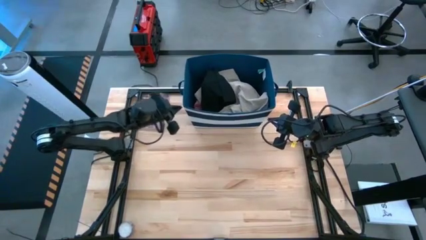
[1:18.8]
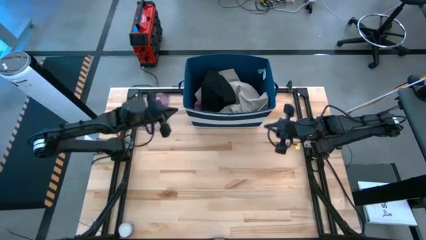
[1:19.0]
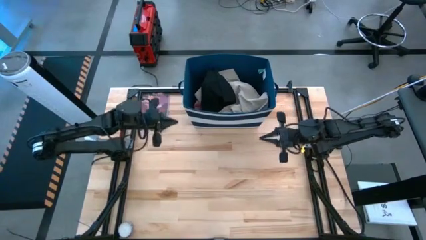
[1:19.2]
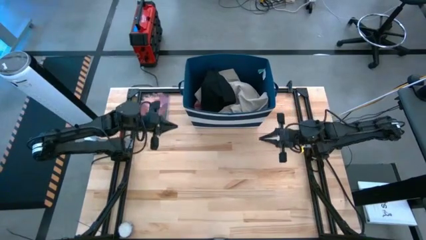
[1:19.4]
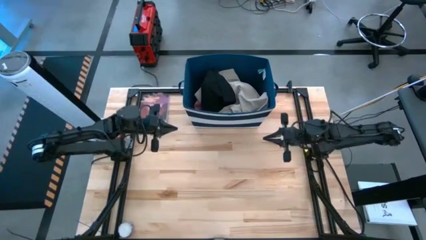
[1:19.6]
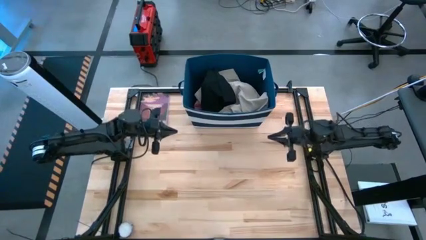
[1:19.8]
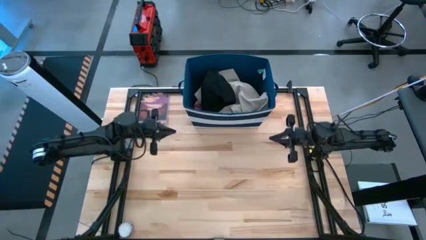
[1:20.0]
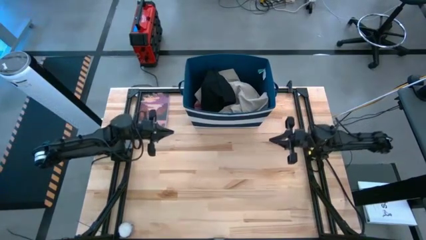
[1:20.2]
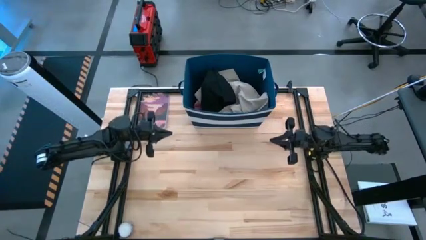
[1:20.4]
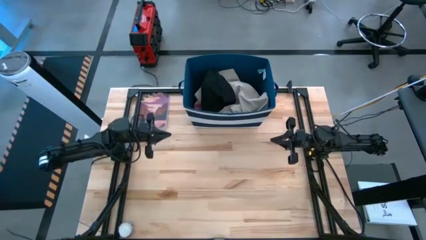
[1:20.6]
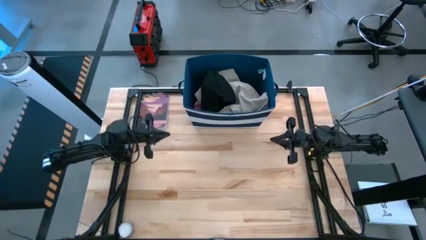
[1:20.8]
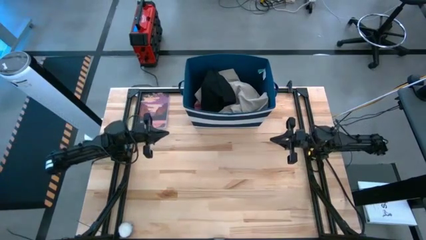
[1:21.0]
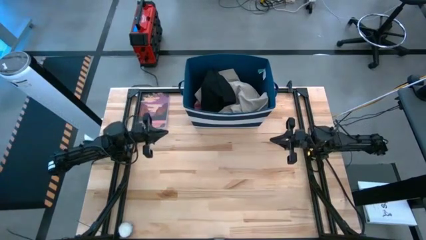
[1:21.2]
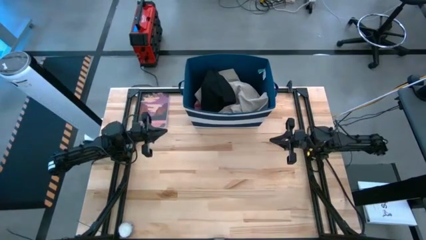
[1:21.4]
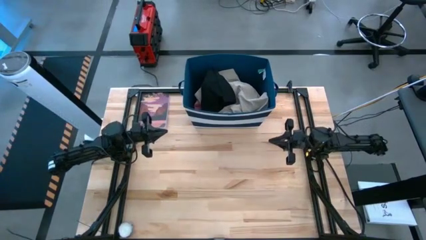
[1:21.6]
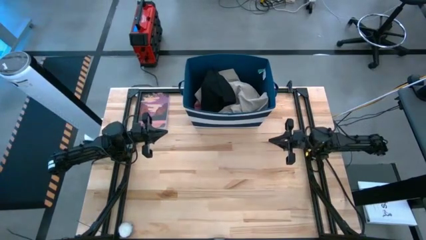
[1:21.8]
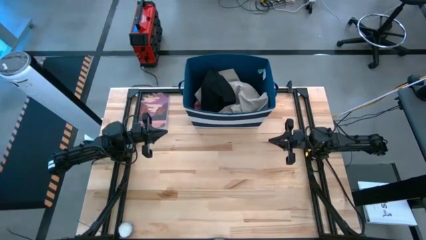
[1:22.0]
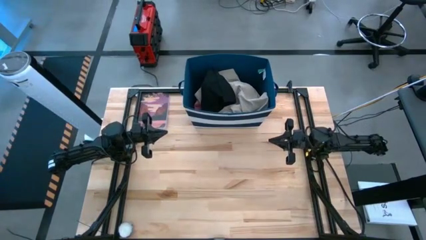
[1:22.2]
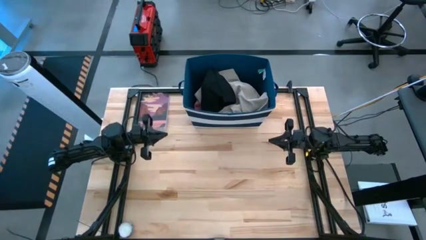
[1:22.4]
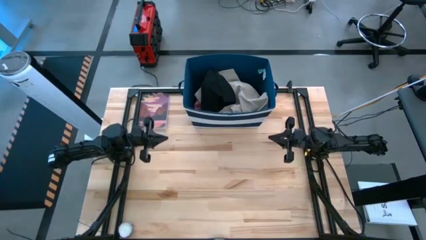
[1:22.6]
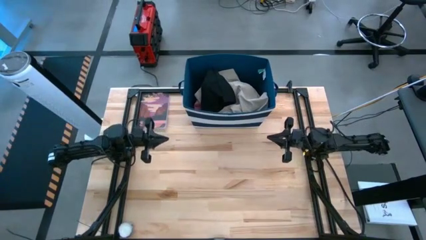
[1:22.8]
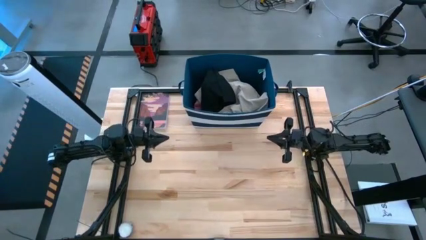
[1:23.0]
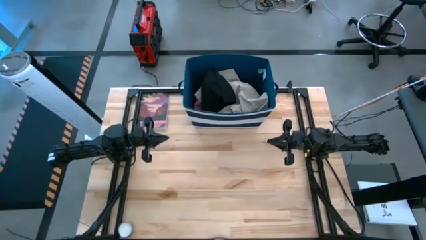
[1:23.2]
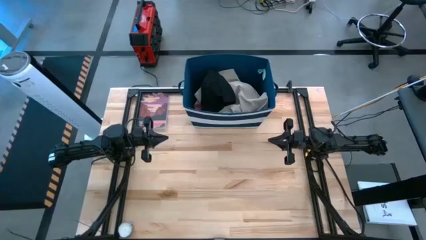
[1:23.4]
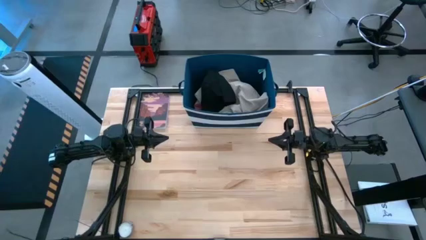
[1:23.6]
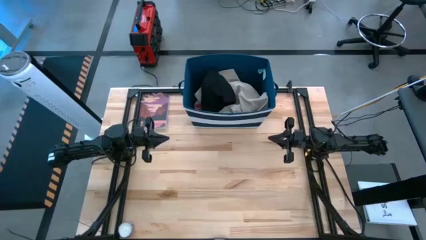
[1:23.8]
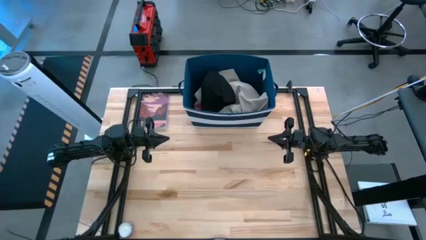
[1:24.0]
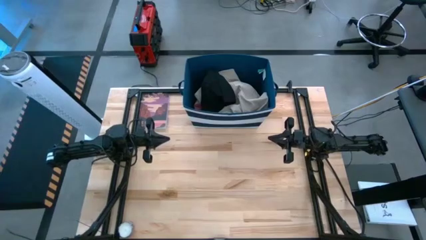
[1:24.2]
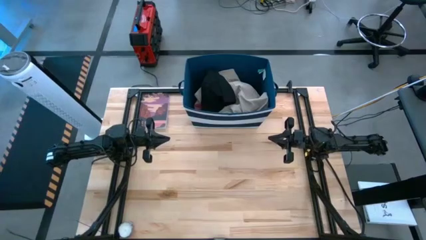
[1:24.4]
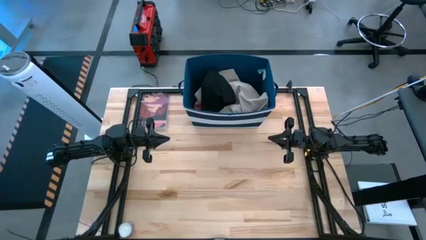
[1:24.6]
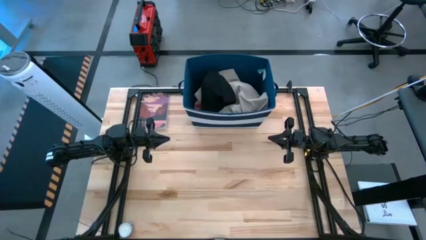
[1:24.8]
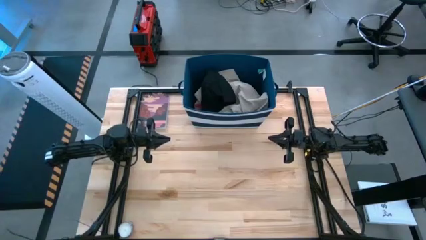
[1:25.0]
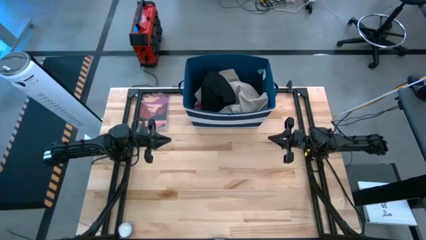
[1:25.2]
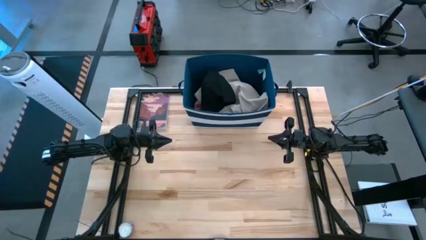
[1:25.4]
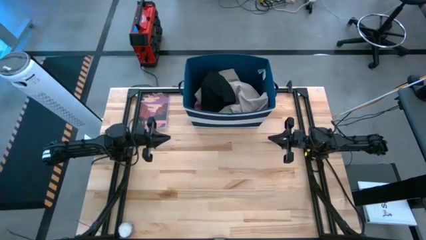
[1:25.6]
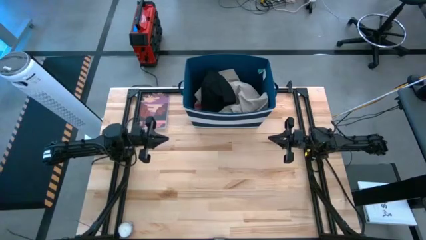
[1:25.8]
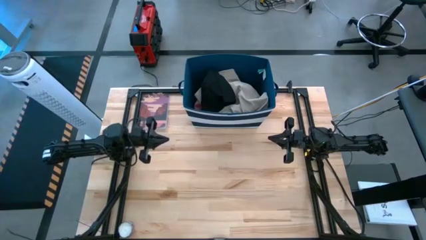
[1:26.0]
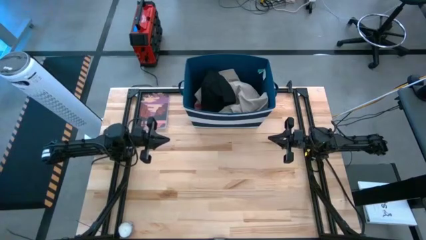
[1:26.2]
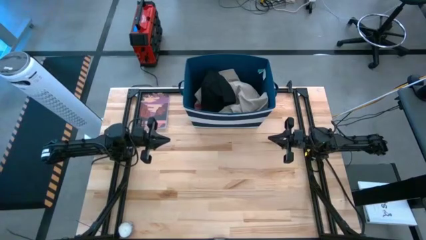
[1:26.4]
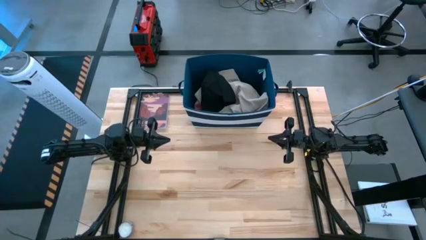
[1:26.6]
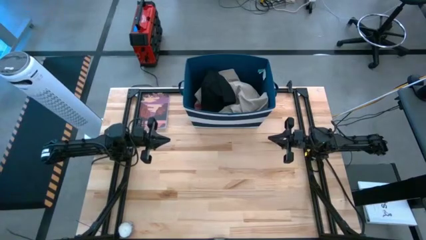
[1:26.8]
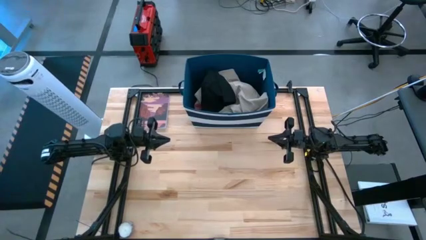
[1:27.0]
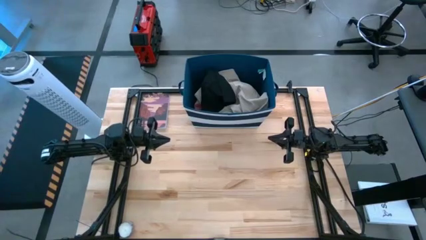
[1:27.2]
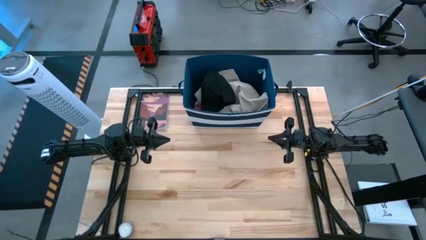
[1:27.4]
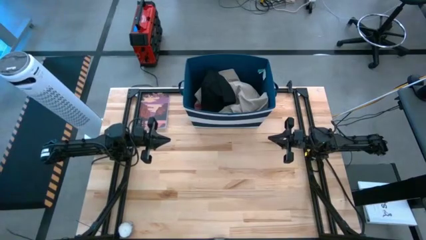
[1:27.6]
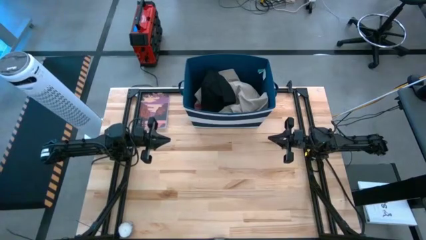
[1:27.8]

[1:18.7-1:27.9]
Task: Sort clothes
Return to Home Position

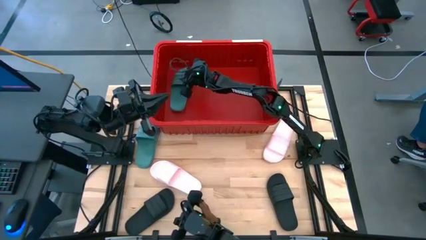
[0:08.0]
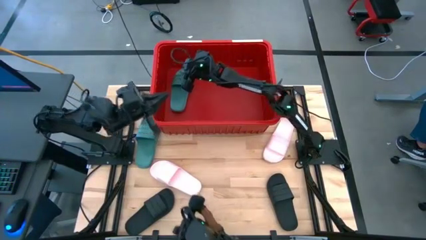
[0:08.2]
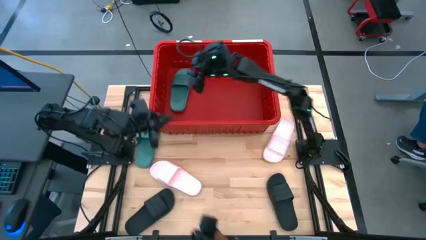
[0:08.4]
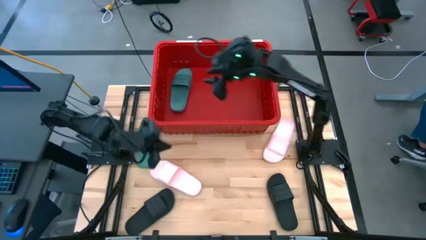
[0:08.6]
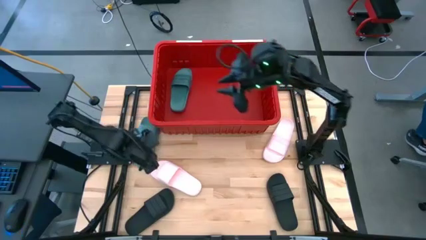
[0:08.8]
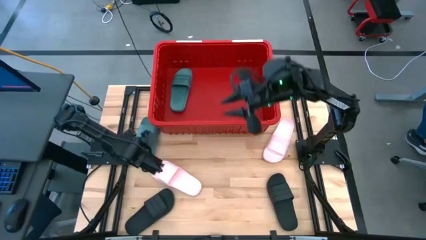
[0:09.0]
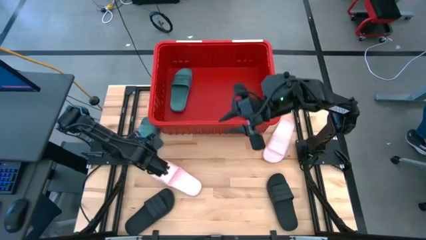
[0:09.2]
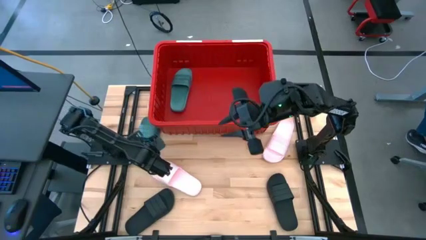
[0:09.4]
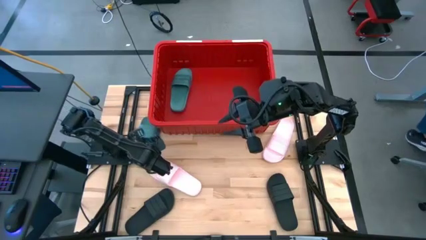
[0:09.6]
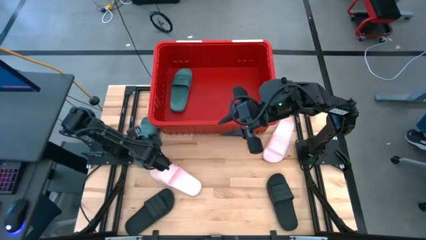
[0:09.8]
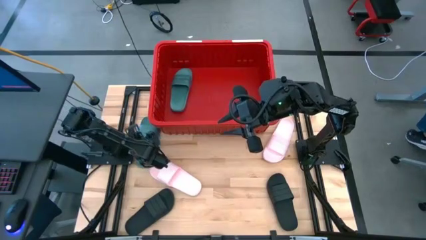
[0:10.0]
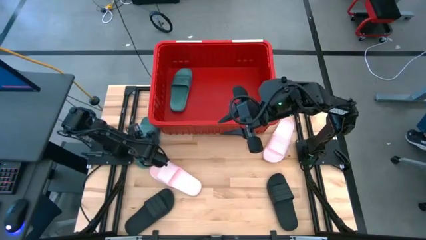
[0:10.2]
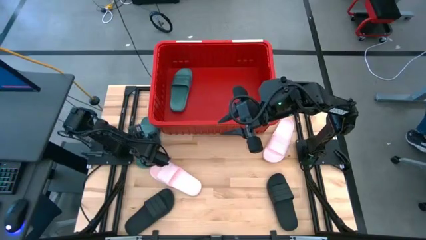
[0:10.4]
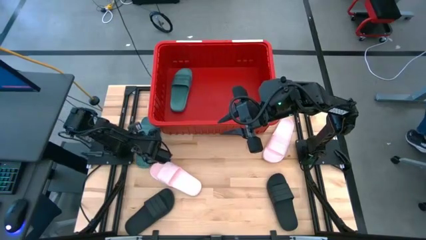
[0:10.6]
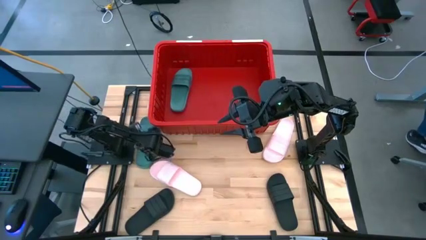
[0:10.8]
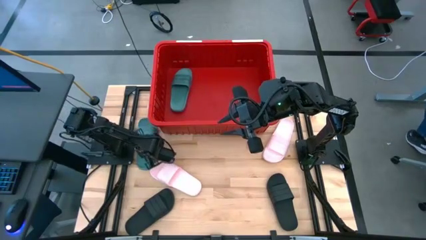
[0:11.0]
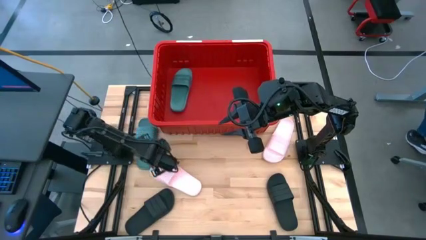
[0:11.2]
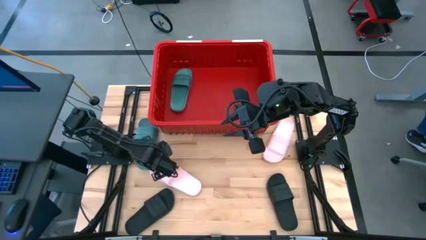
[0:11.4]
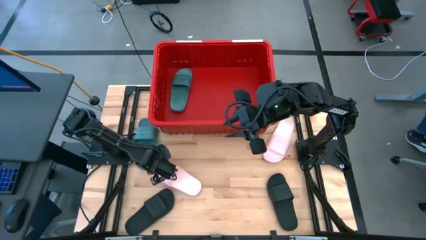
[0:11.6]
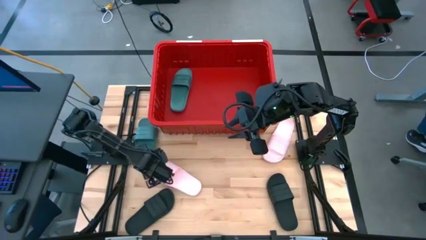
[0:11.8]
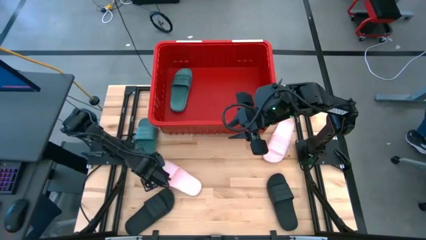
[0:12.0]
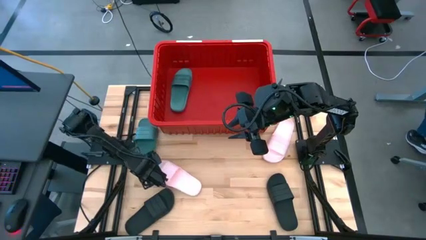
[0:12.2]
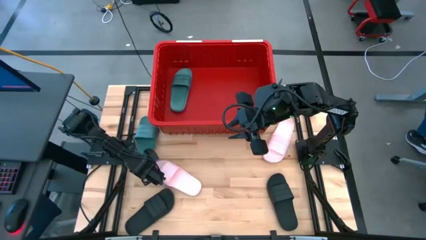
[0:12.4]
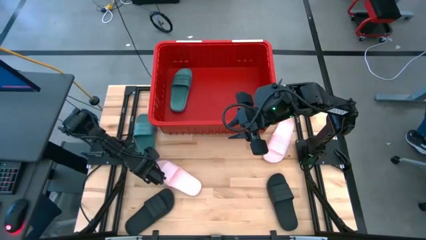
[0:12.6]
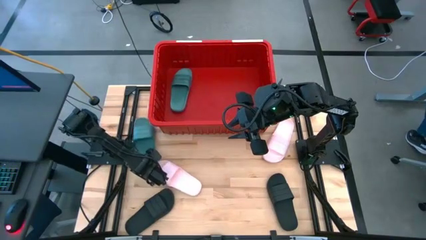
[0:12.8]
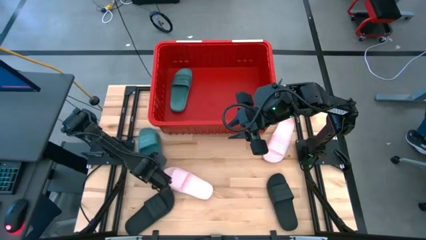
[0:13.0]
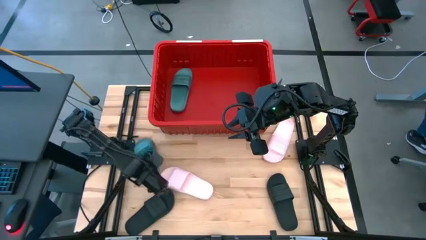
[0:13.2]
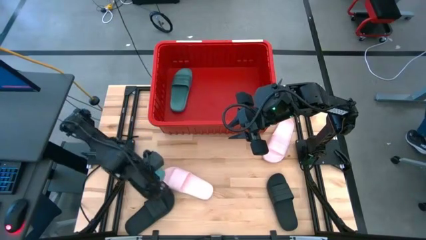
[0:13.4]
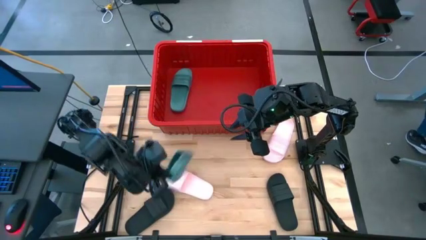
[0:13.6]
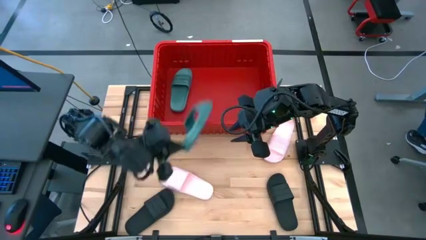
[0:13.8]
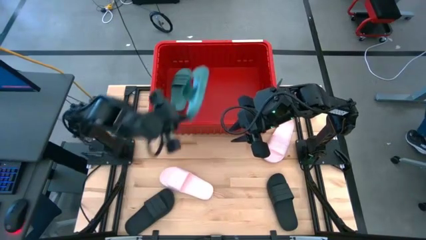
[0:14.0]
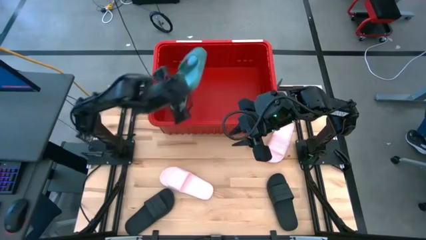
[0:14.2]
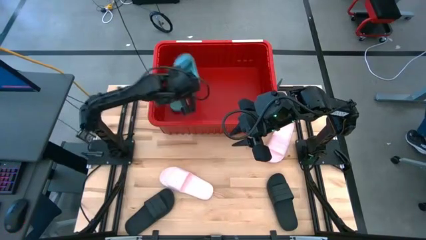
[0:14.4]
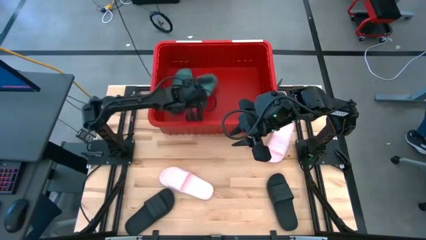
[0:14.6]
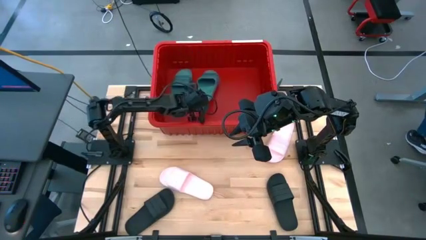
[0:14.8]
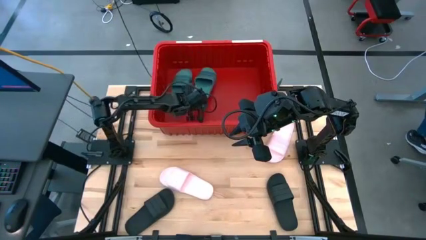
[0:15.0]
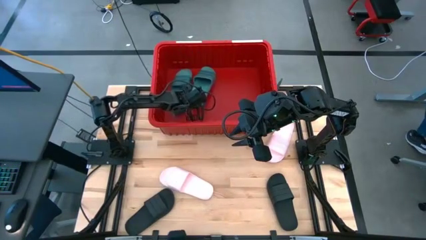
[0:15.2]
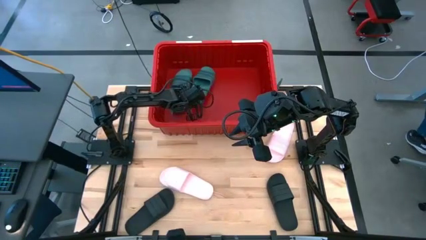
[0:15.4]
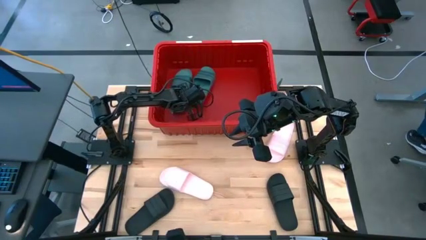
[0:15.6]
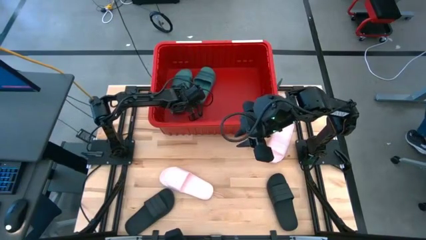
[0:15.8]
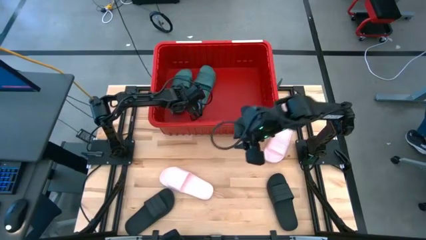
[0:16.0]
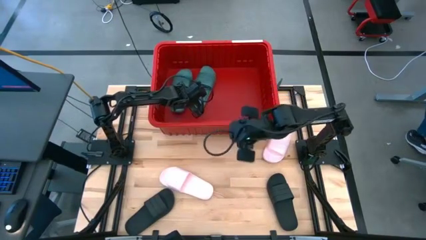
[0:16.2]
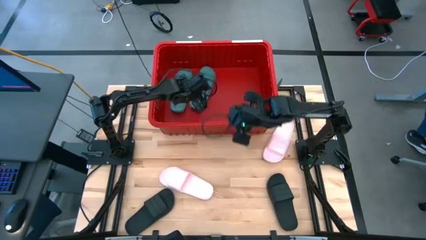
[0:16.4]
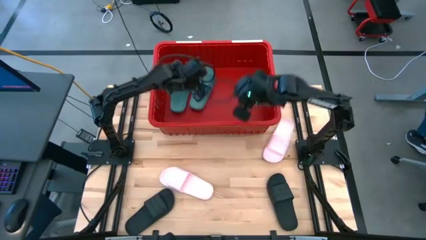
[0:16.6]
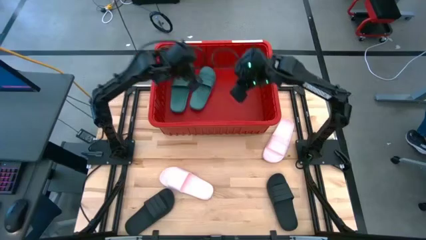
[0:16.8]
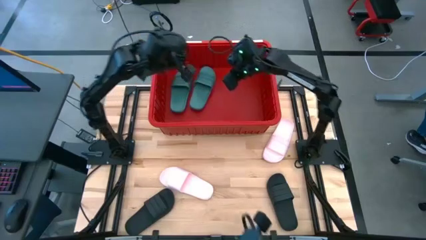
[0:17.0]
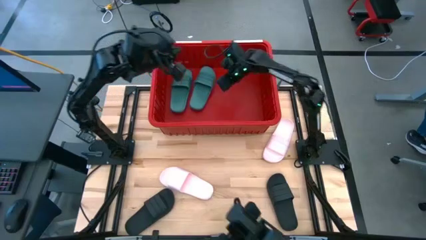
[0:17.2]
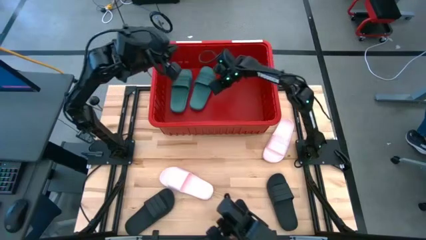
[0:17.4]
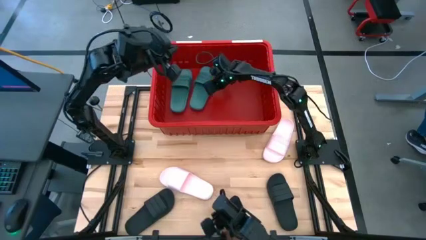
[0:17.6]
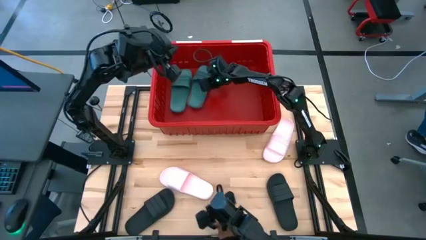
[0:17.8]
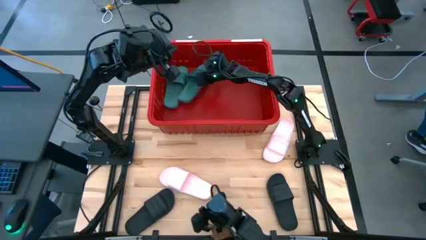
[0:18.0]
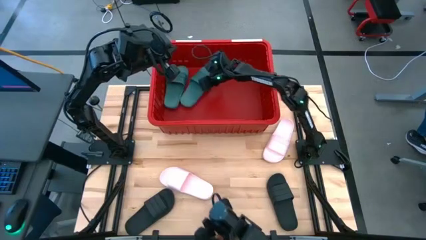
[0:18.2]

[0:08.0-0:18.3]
Task: Pick and place slides into bin
Put the green slipper into the red bin
